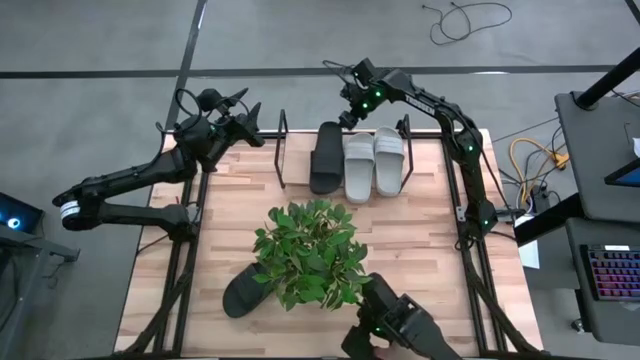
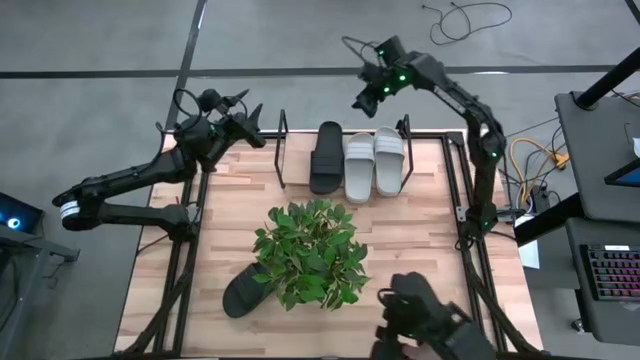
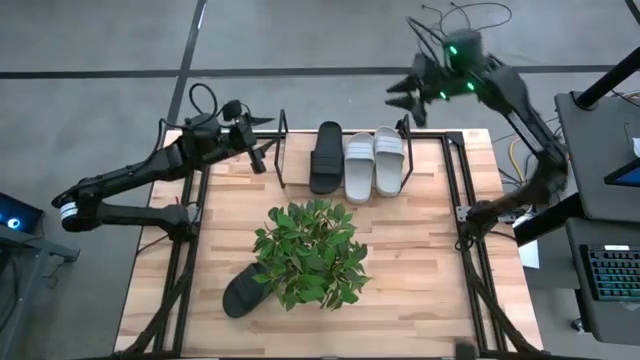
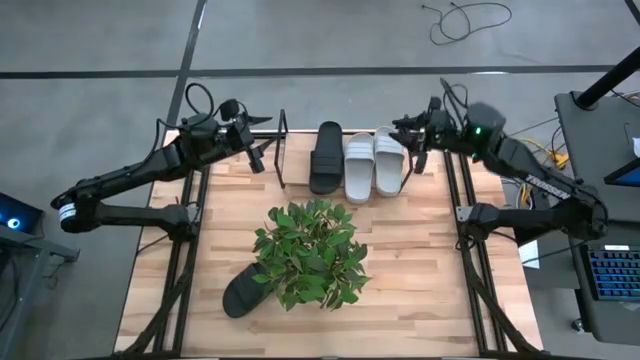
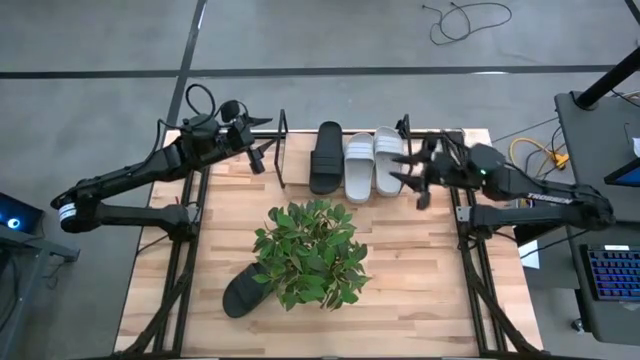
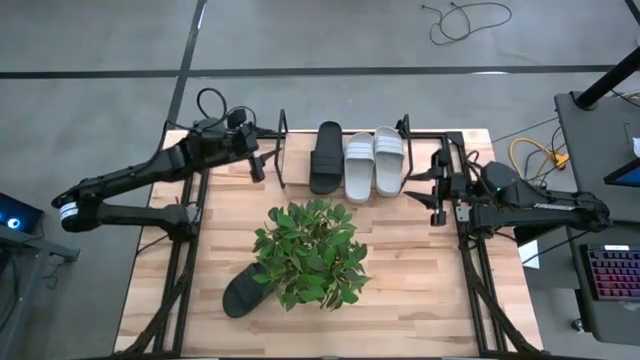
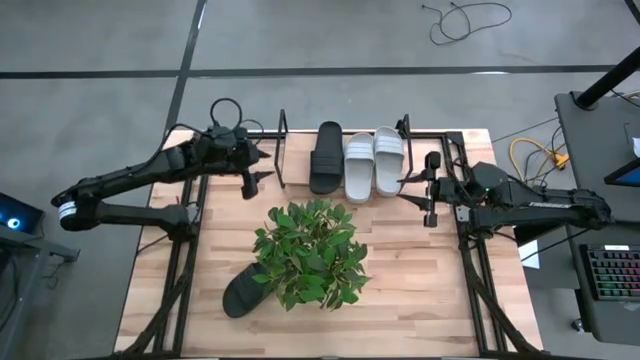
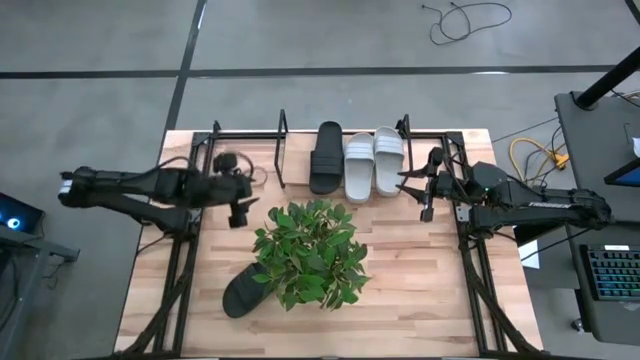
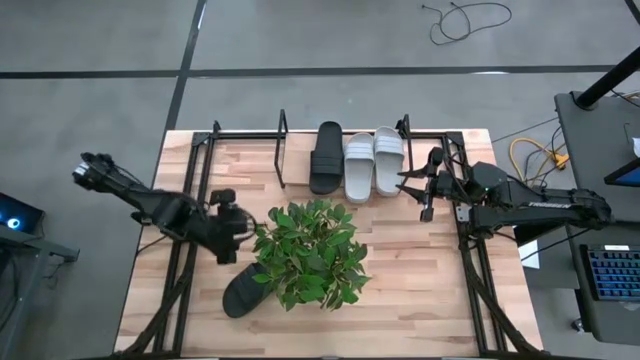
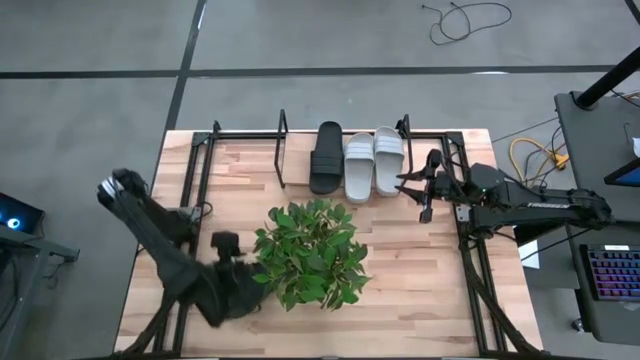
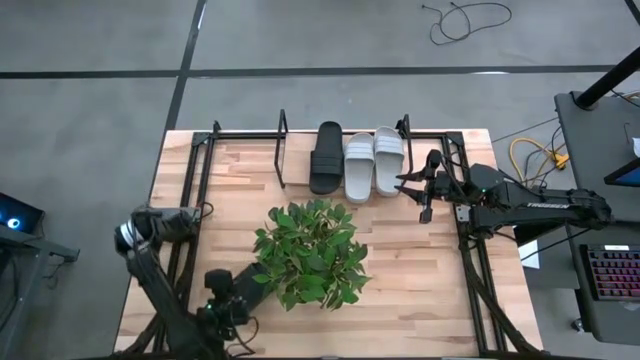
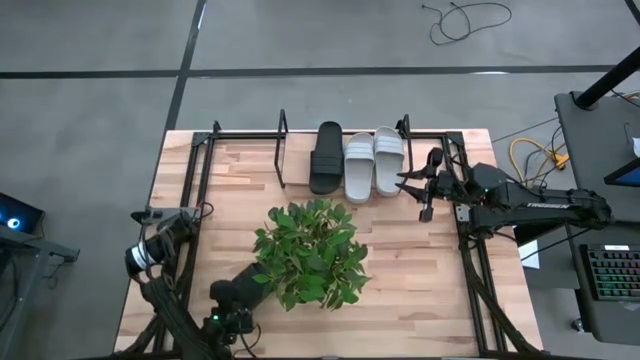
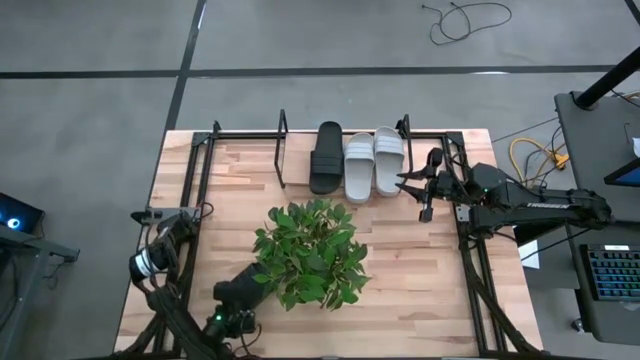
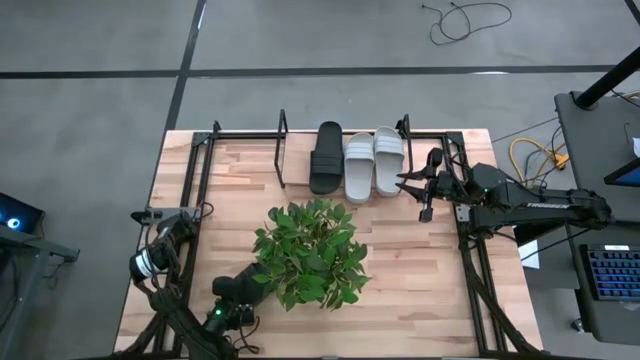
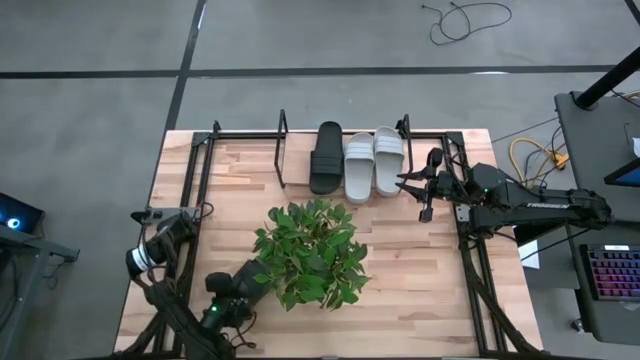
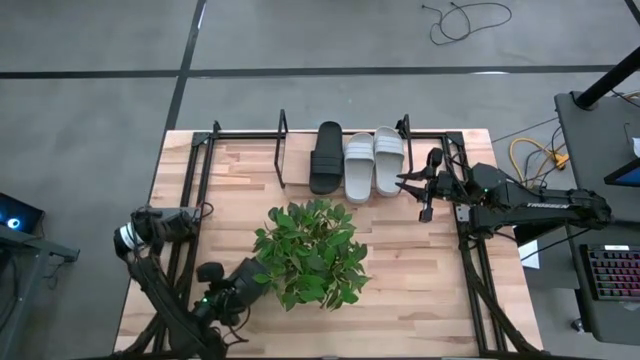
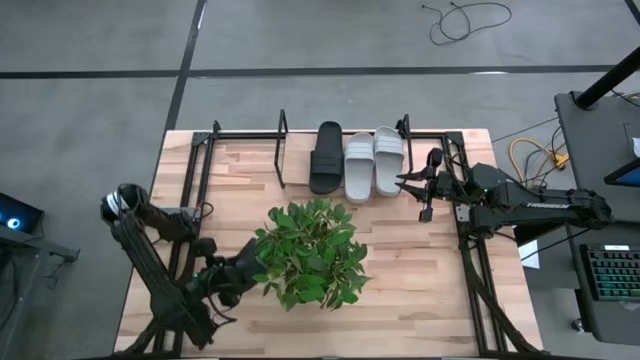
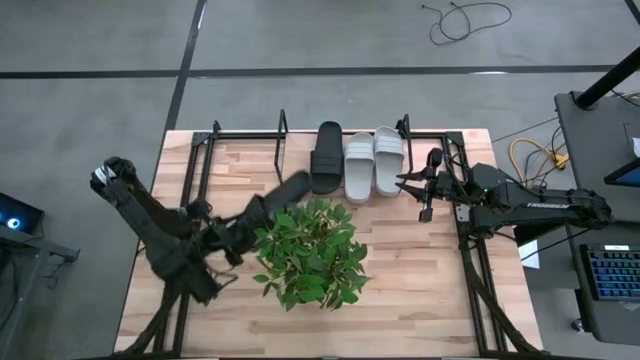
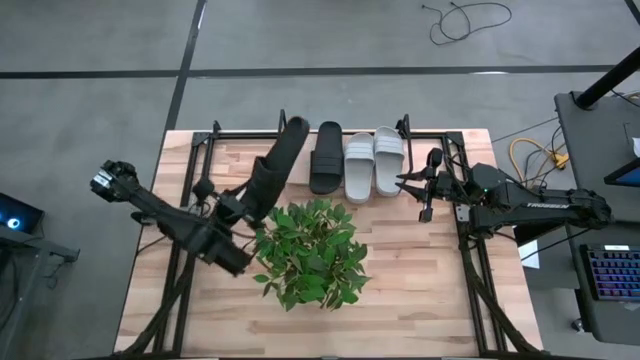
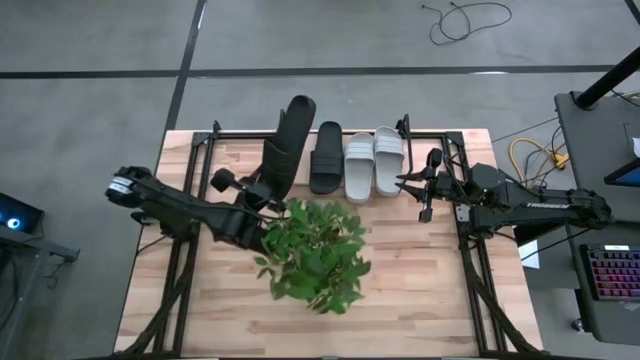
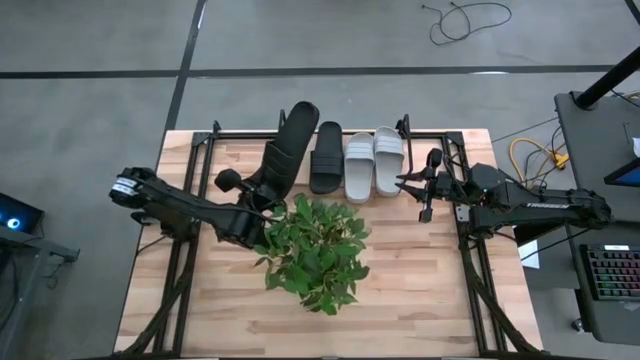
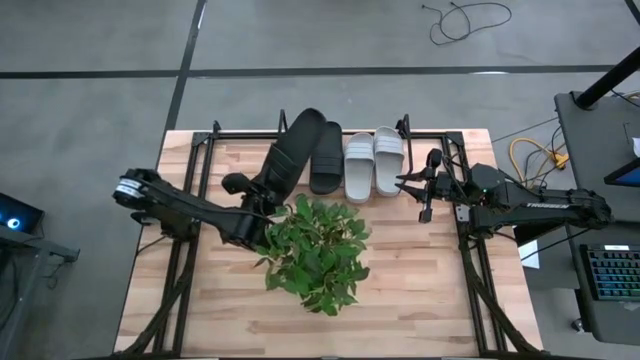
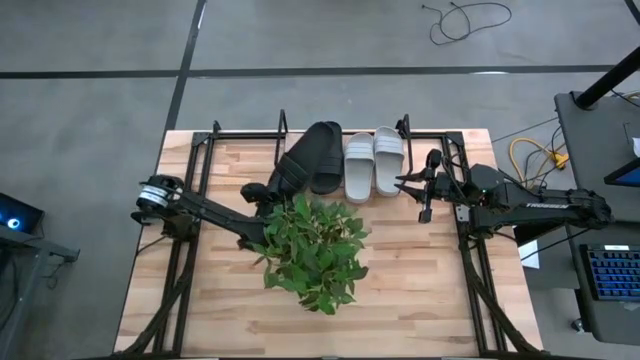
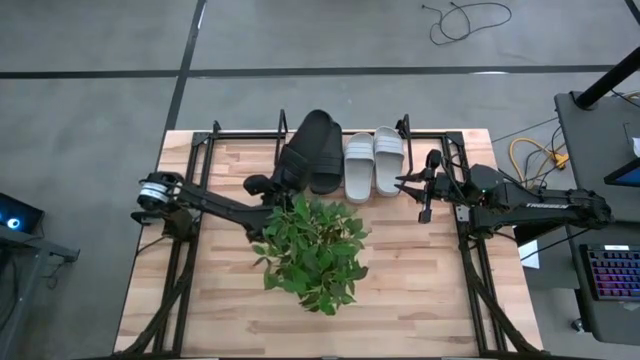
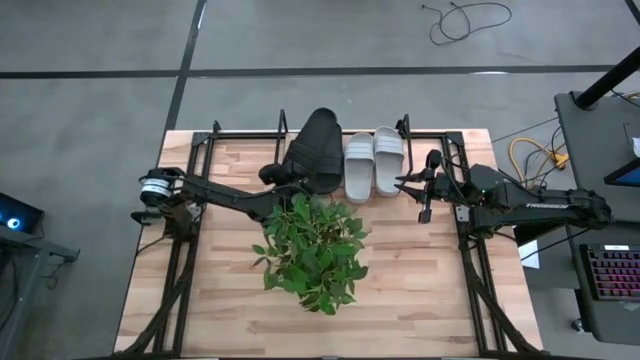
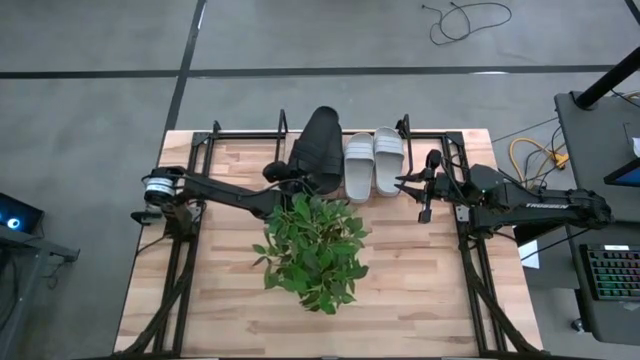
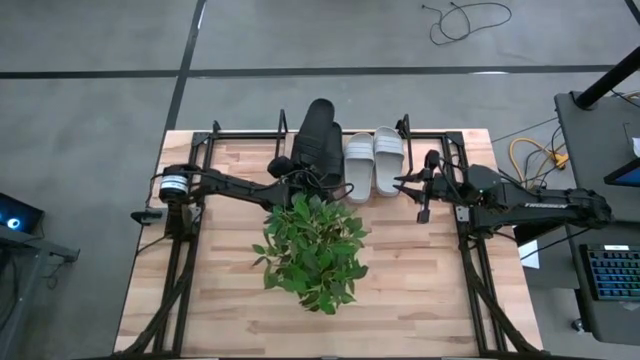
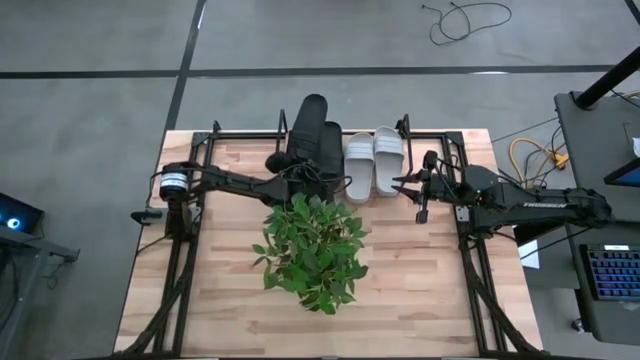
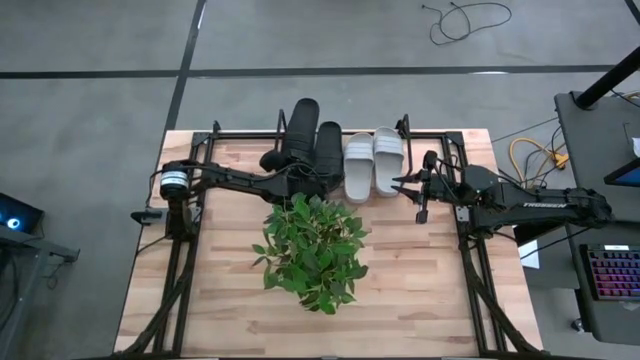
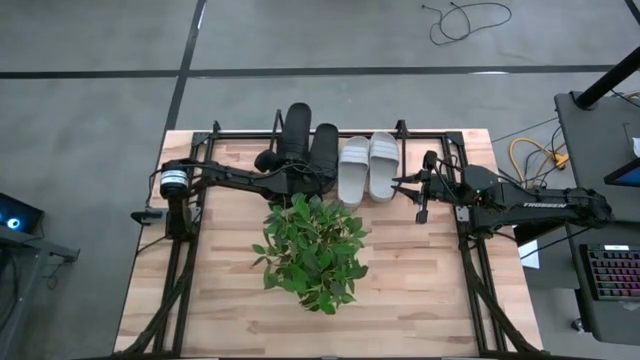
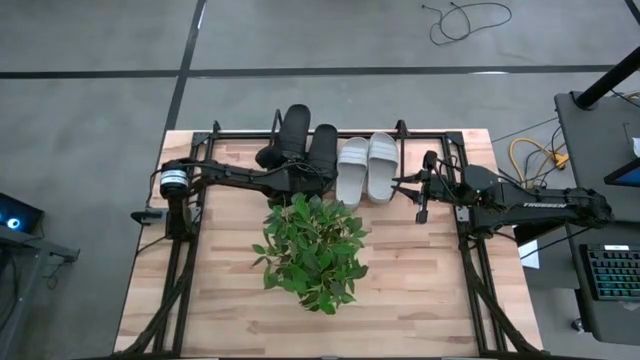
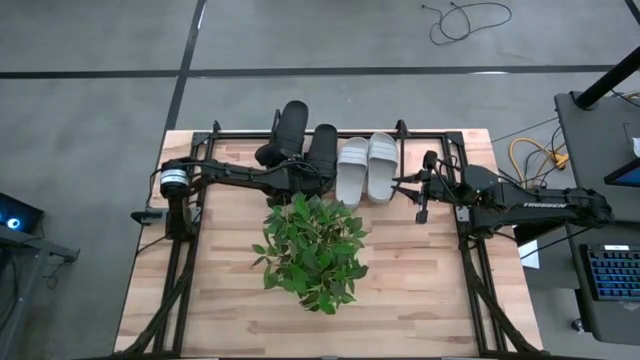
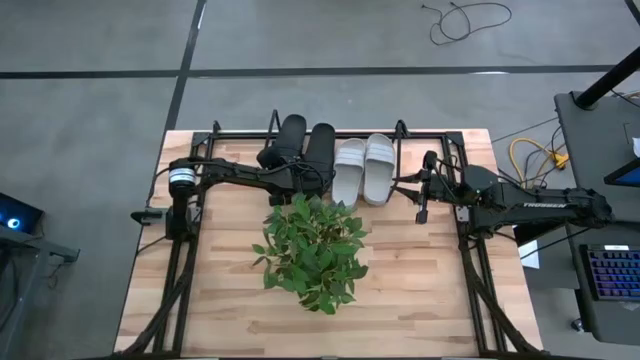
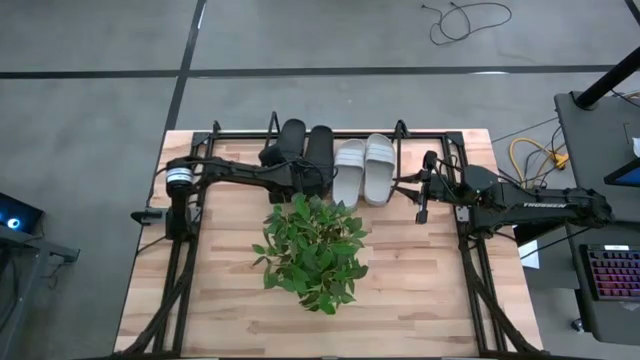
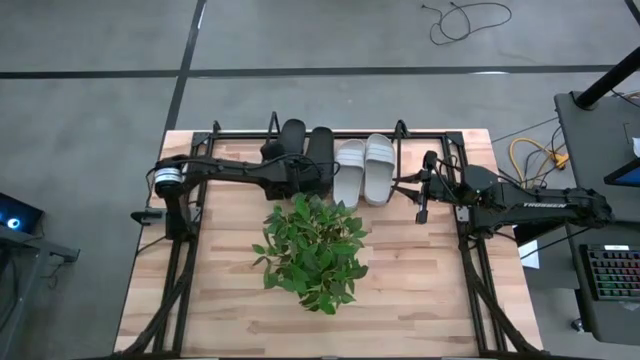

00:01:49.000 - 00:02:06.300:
Task: Pick and place slides into the shelf
Put the black slide on the shelf

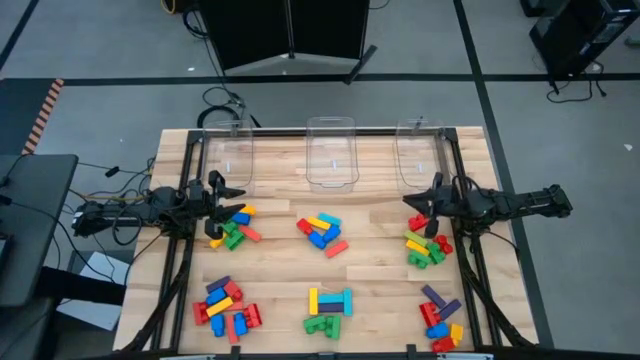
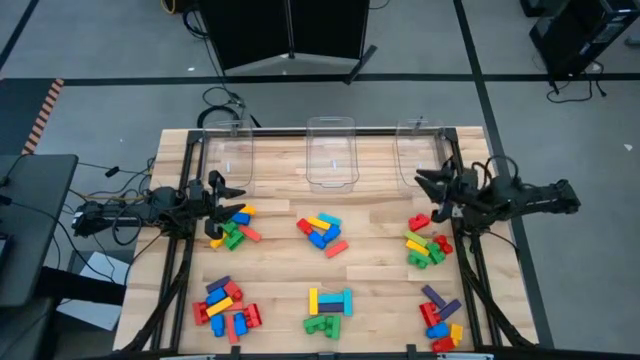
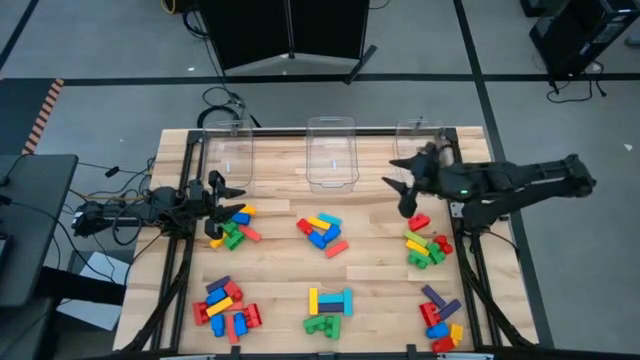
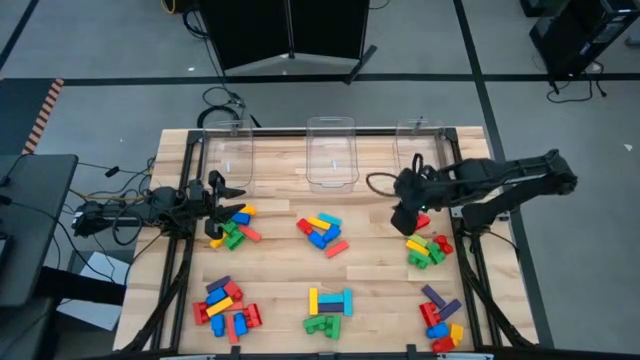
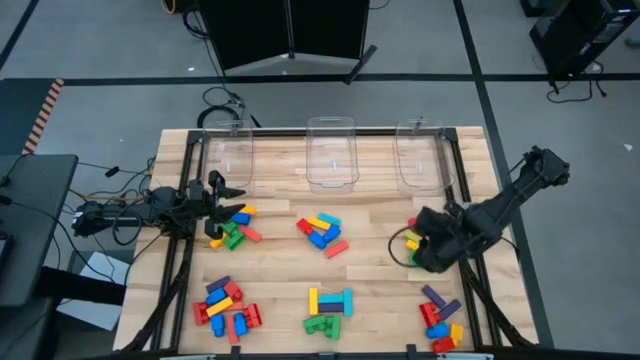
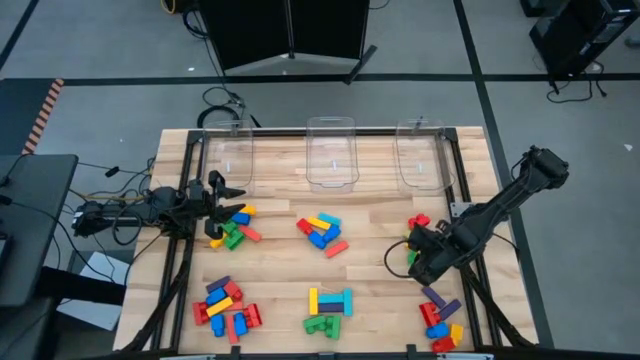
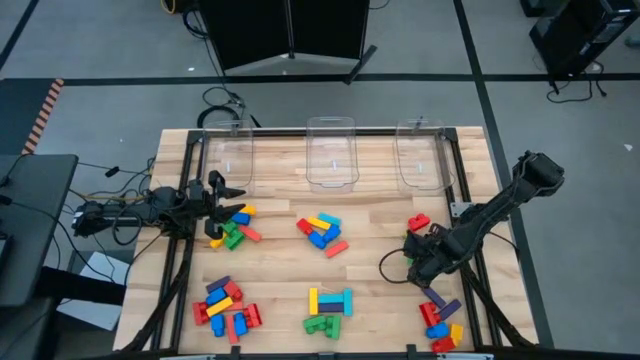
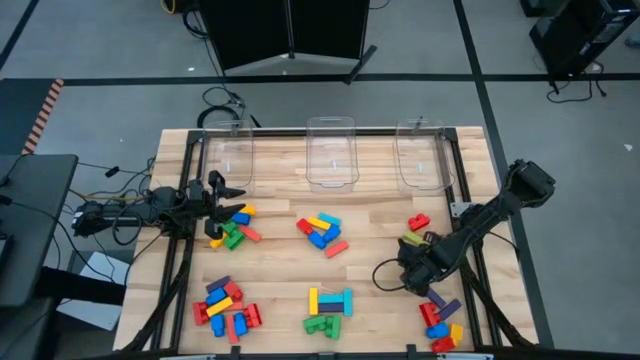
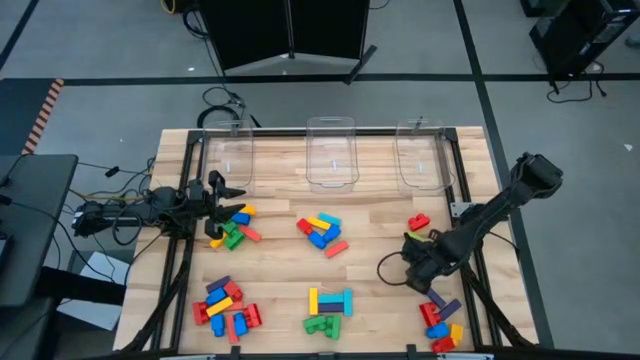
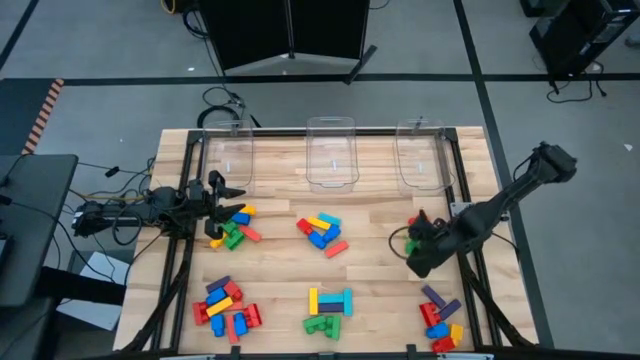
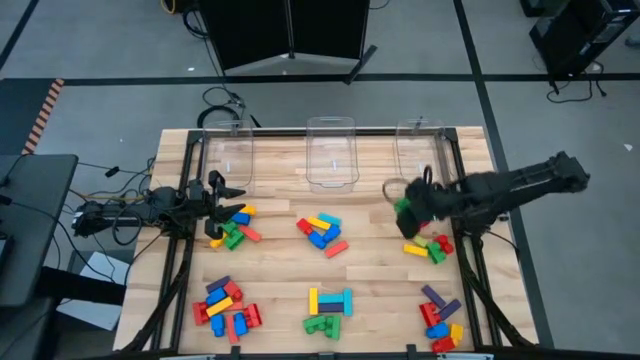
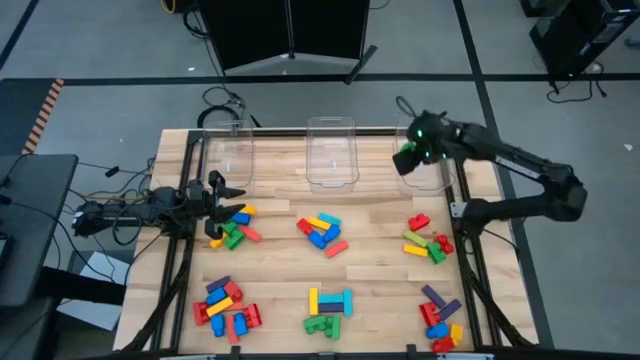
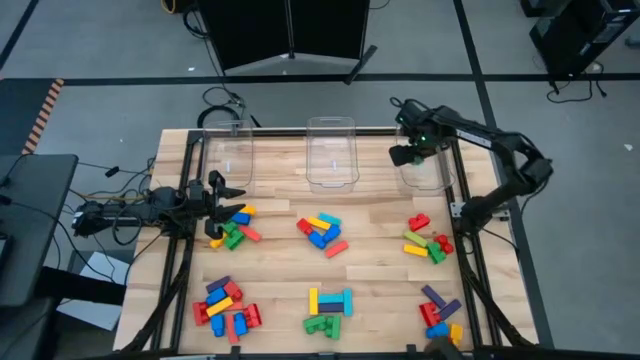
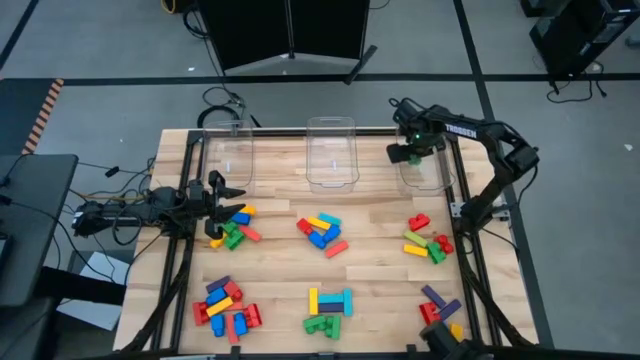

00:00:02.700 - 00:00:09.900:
Task: Sort blocks by size
Put the green 2 stud game piece into the right transparent bin
